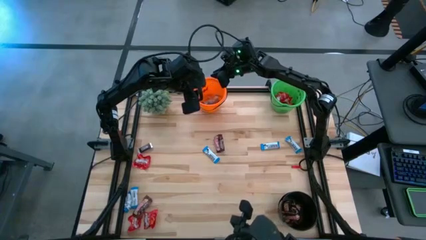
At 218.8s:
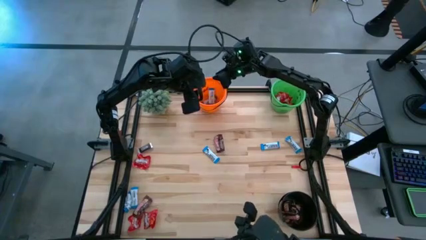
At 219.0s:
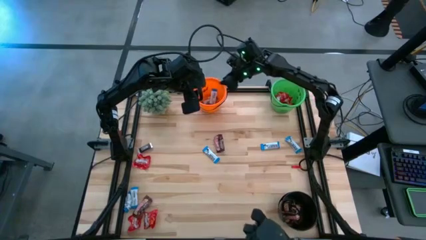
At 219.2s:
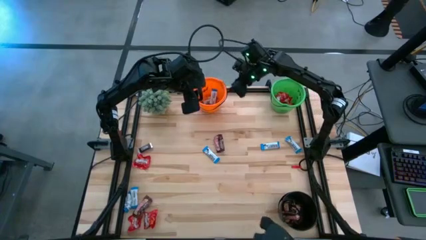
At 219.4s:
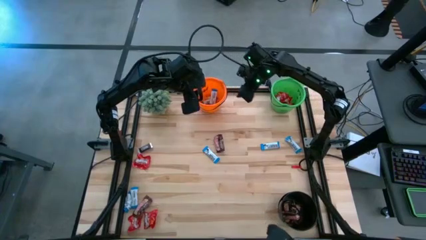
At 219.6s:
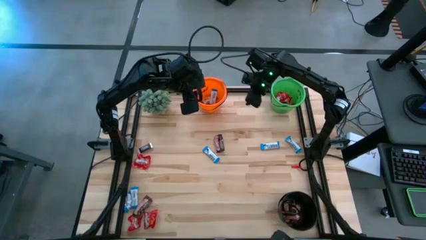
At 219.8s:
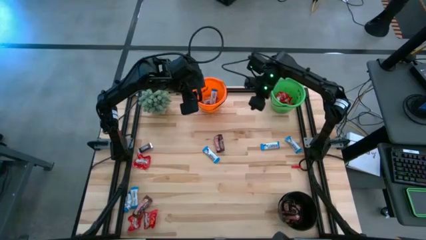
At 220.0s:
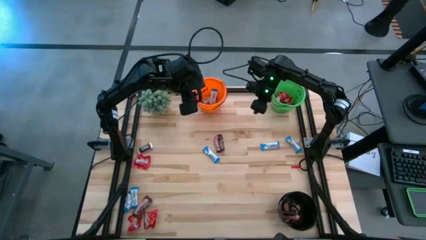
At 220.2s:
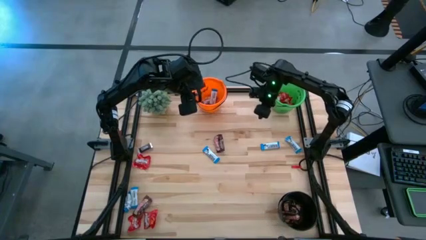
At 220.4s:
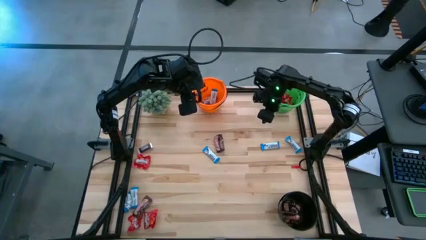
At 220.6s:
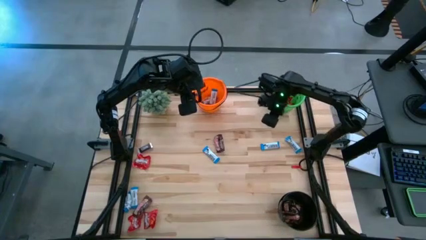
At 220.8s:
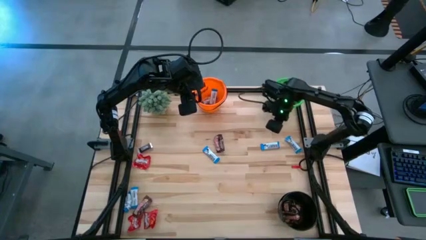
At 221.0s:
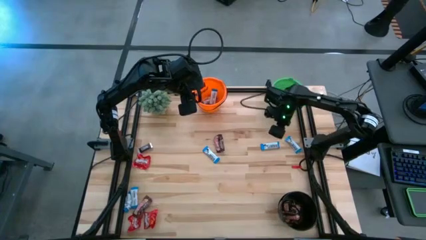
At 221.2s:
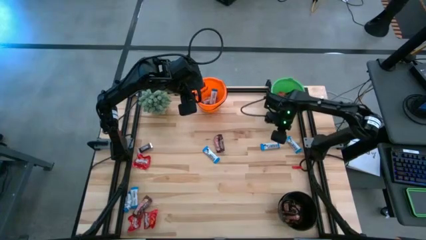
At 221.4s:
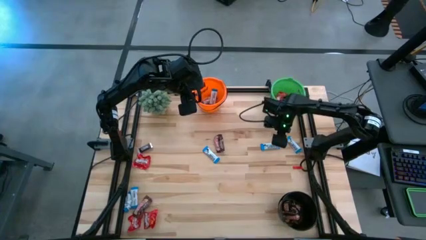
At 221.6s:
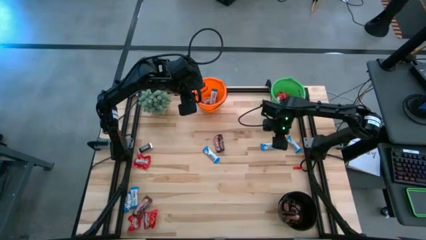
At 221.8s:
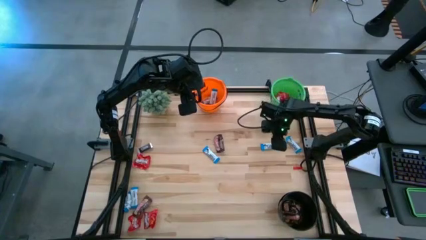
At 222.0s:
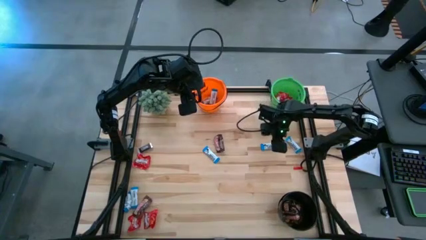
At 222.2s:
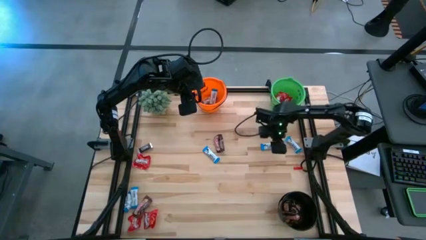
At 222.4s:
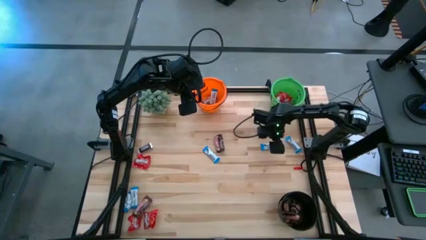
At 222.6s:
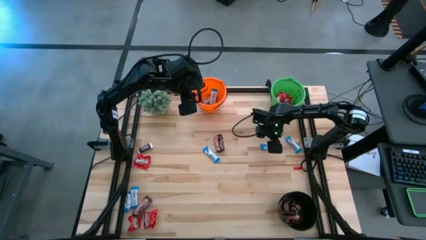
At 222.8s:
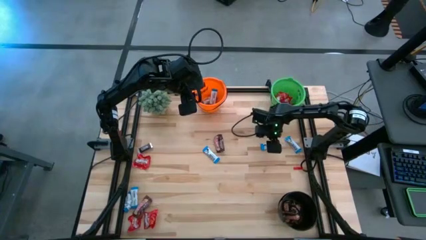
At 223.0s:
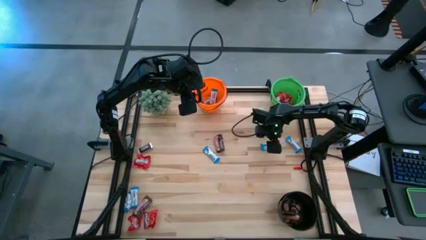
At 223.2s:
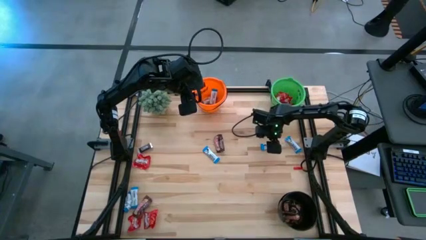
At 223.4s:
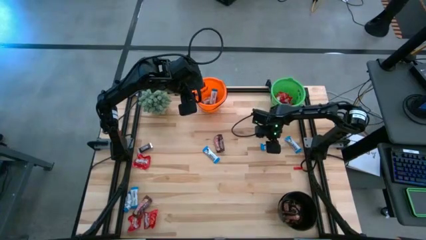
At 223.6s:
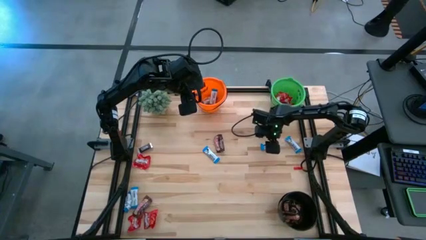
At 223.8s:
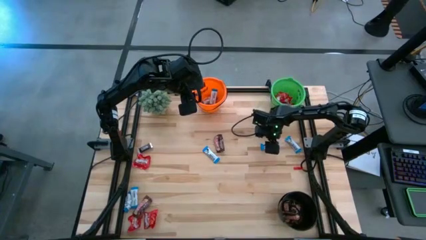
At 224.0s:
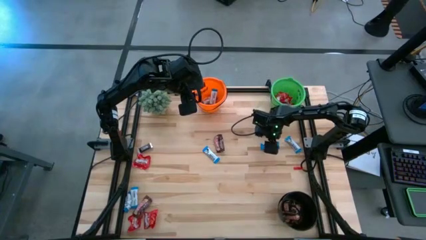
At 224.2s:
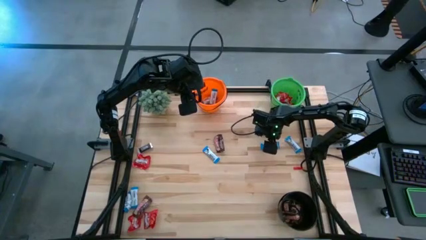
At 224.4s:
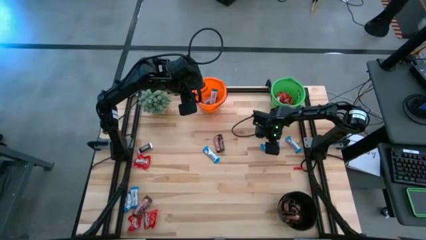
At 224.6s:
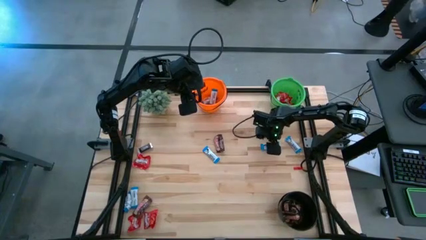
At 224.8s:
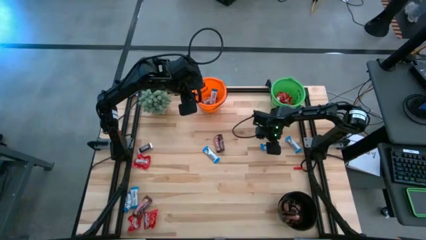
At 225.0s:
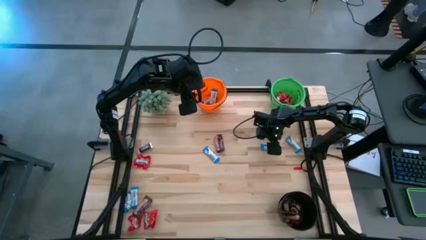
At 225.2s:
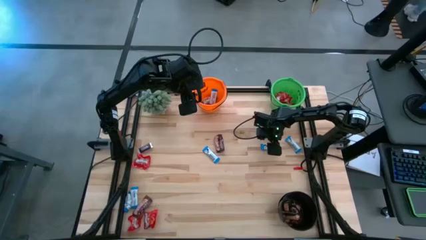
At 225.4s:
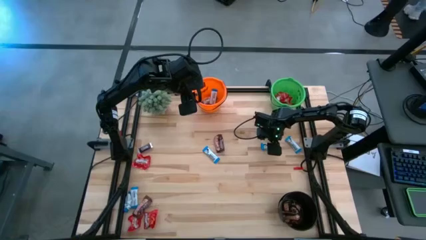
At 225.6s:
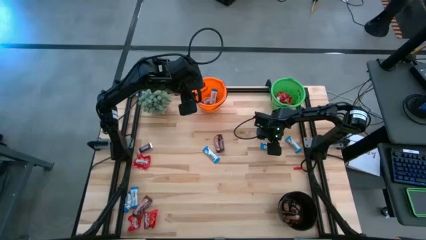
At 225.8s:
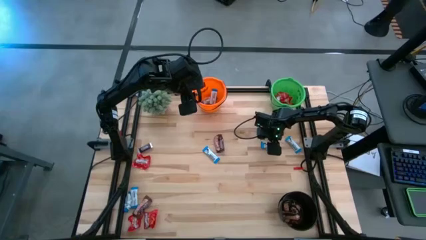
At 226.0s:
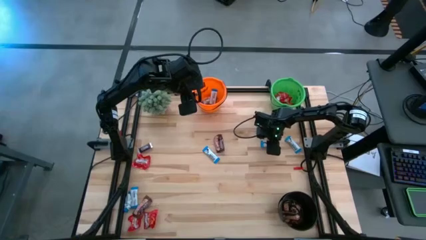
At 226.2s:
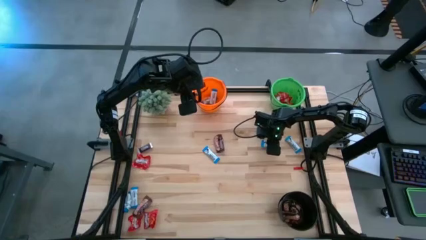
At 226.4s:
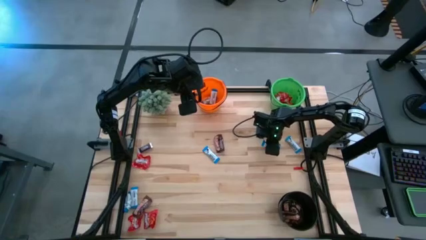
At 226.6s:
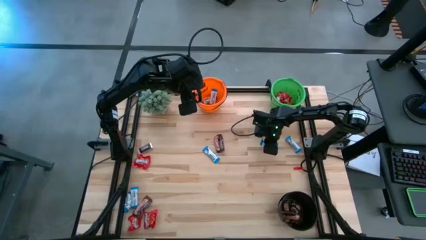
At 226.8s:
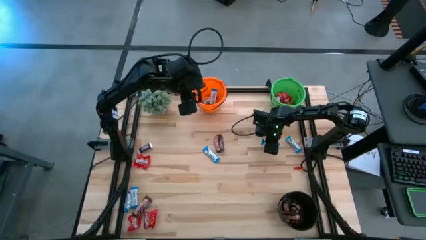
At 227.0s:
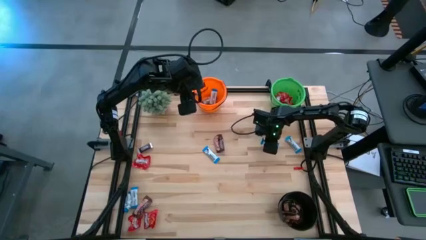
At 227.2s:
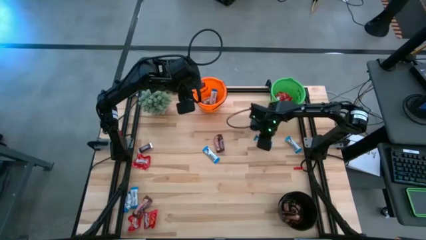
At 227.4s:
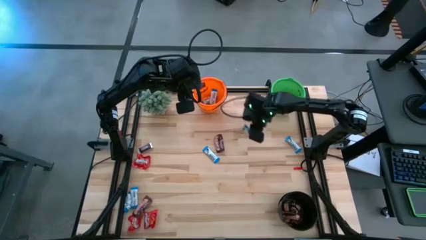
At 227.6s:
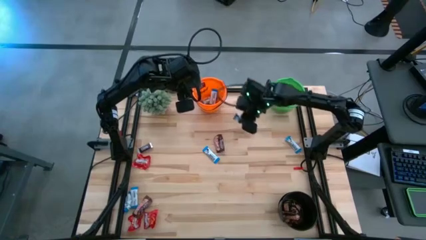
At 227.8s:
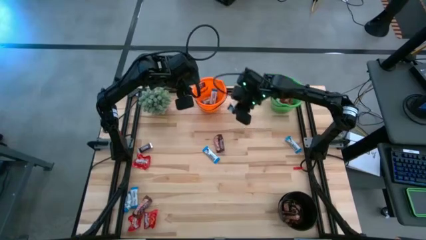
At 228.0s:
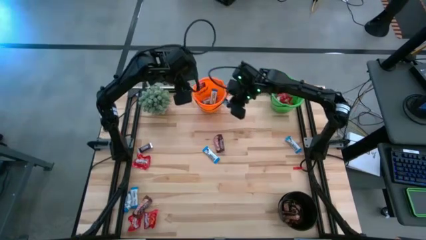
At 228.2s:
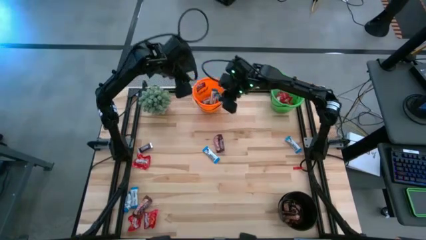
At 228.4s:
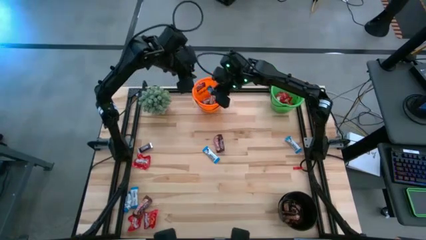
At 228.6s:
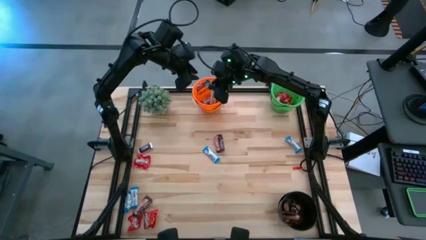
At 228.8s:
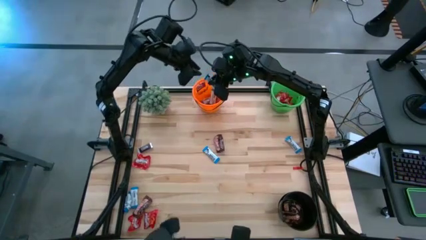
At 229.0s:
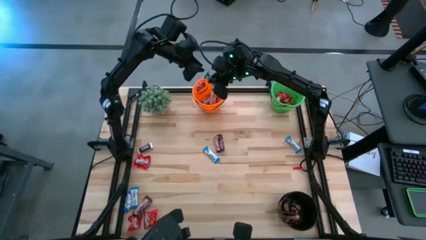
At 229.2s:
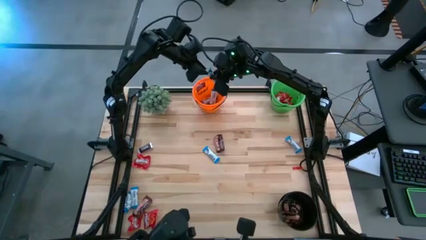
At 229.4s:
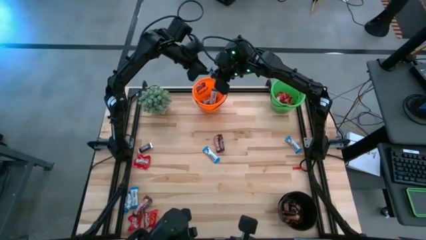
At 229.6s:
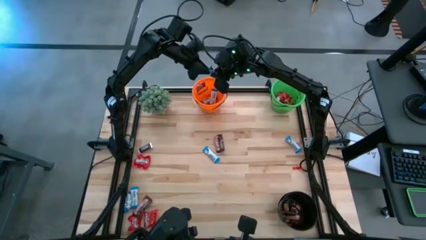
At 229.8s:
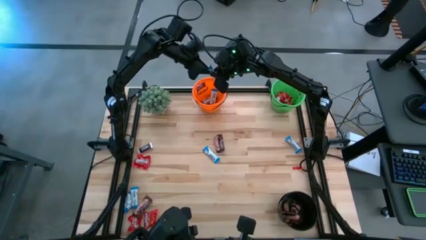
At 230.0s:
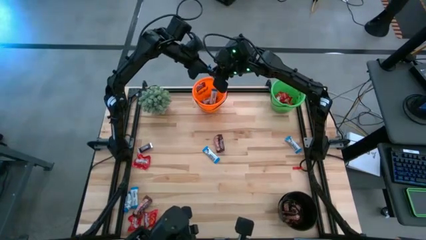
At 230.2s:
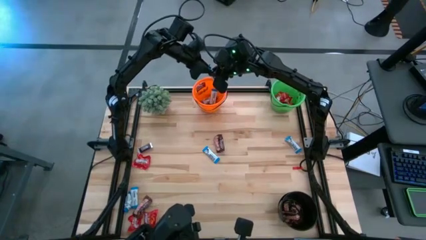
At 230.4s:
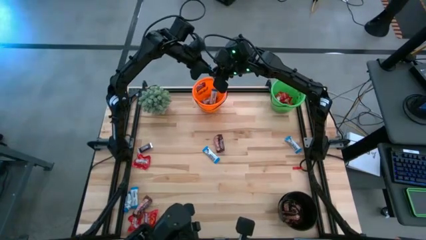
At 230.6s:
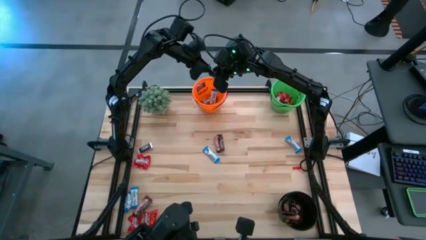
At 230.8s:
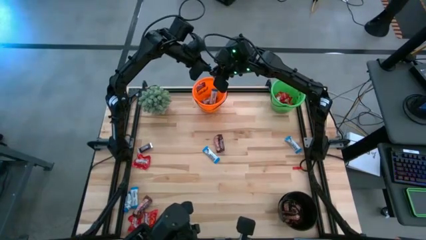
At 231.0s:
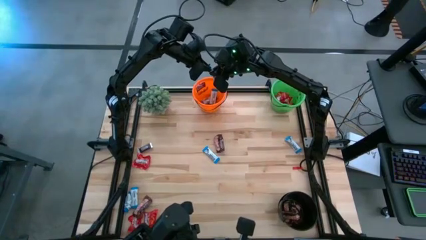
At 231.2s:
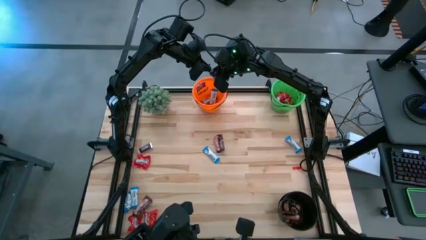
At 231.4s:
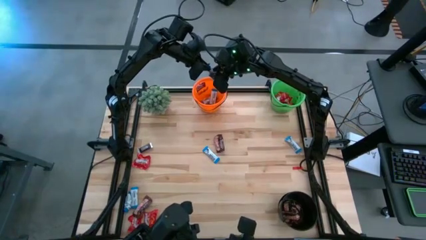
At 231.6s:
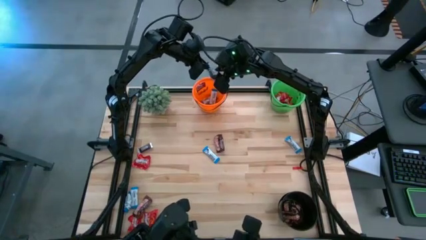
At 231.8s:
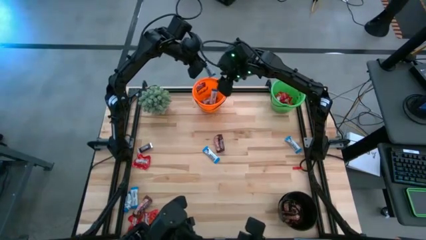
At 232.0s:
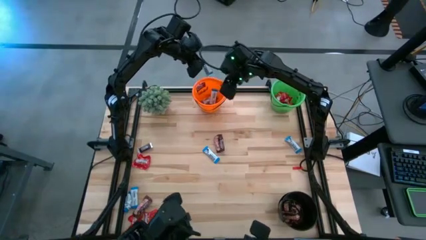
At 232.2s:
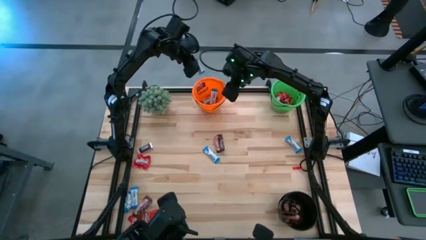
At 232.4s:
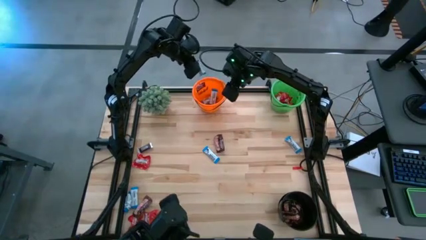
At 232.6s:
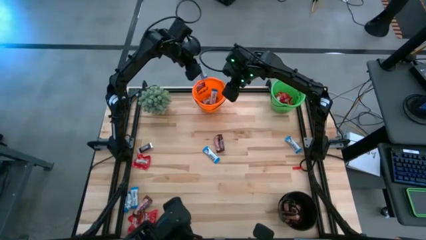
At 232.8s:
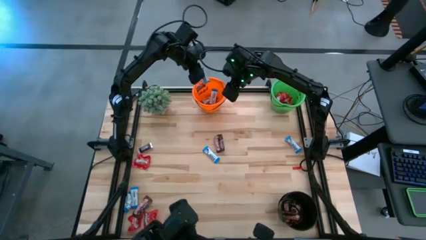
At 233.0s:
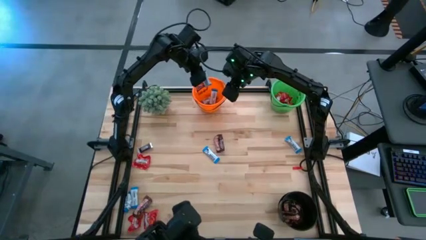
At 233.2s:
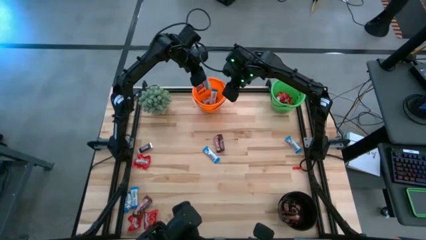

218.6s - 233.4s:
Task: Organize candy in baskets
Put the white chocolate bar into the orange bucket
